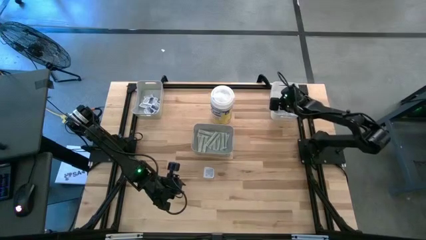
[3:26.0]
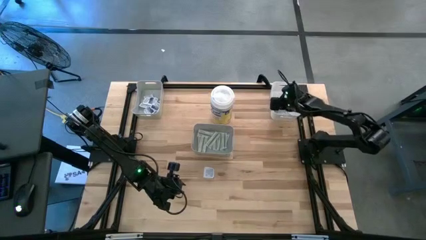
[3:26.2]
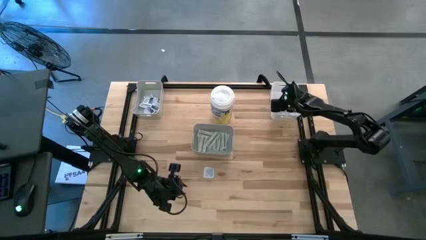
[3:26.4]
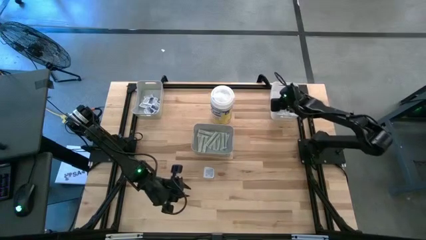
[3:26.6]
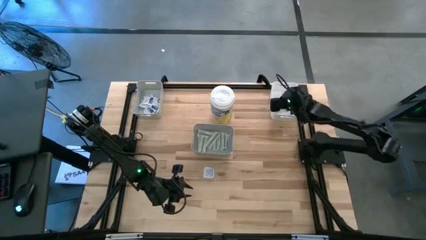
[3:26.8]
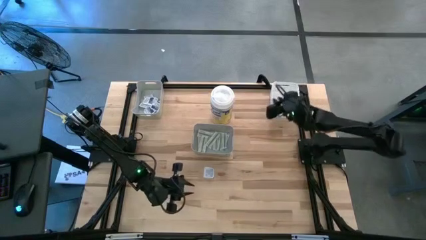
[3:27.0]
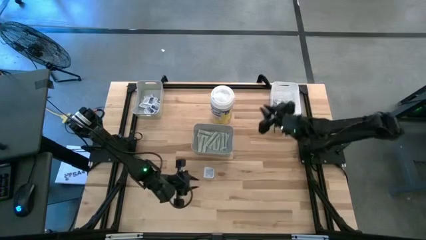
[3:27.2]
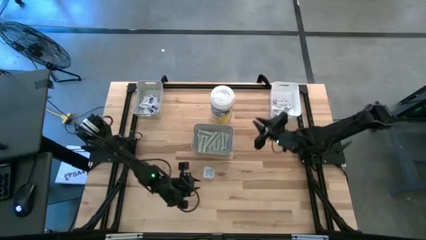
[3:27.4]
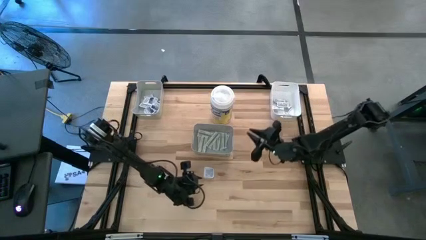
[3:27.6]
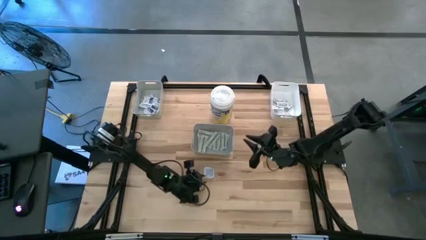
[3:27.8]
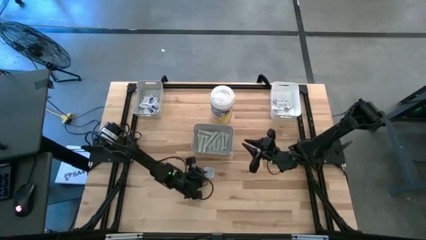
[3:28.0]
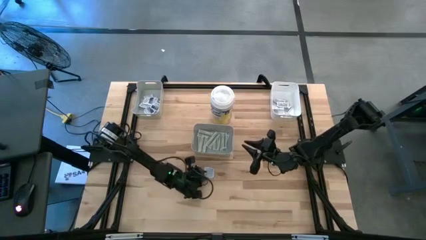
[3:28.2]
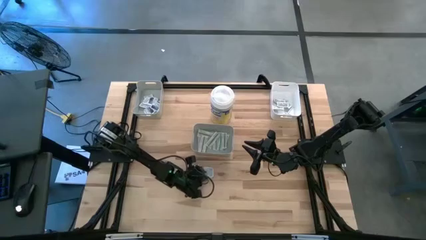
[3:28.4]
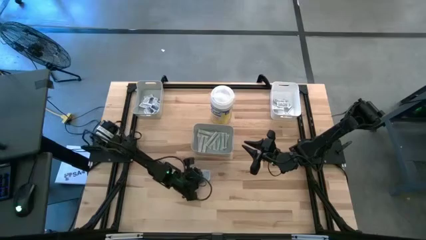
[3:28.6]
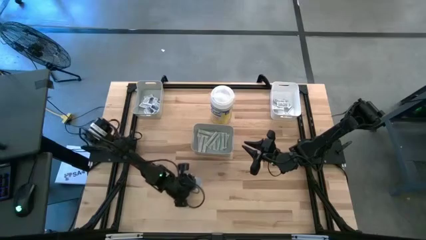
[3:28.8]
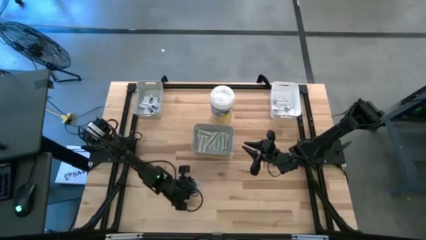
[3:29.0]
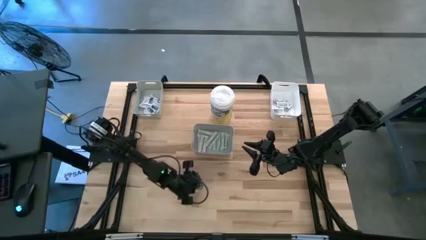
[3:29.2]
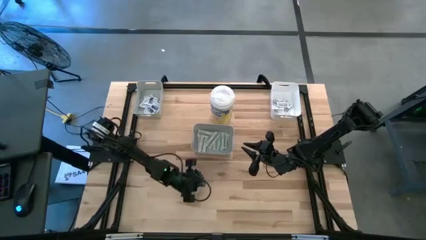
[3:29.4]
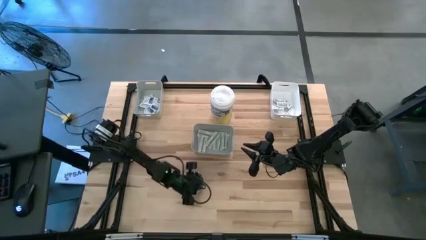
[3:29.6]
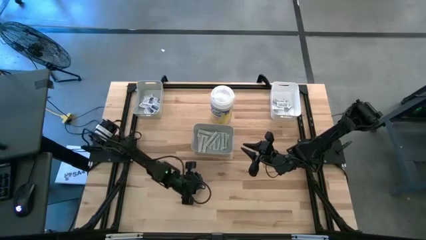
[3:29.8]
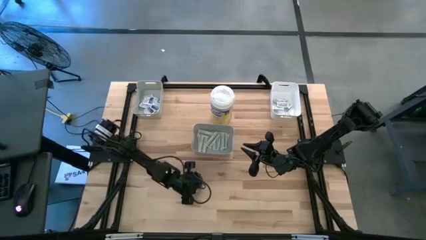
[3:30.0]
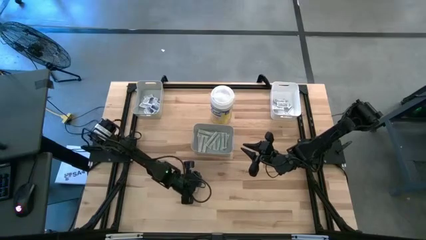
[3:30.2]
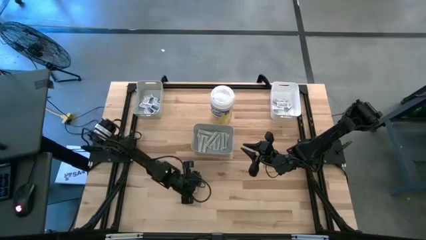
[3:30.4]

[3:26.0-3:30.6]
Task: Pick & Place First Aid Supplies
Put the alcohol pad into the top gray bin

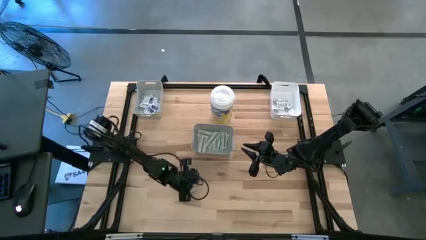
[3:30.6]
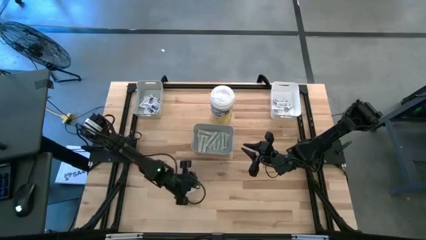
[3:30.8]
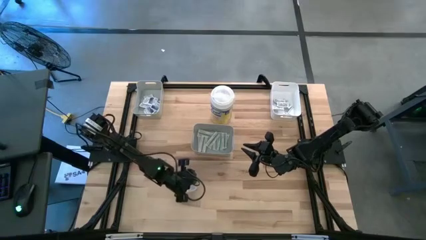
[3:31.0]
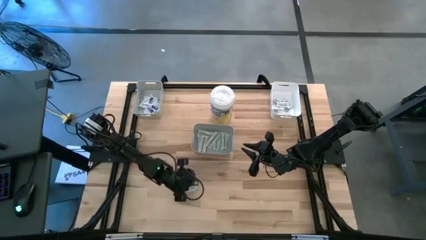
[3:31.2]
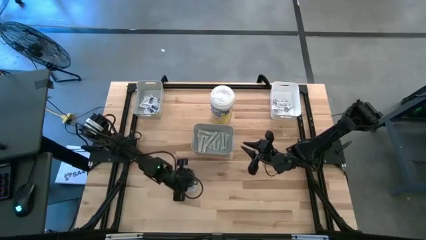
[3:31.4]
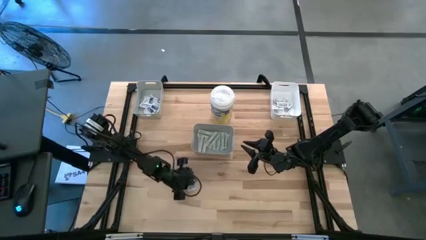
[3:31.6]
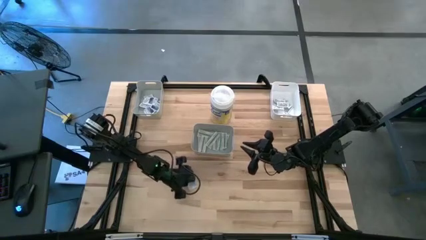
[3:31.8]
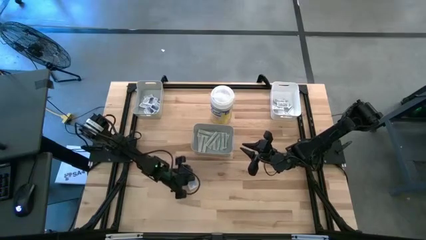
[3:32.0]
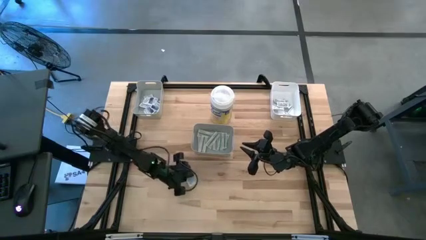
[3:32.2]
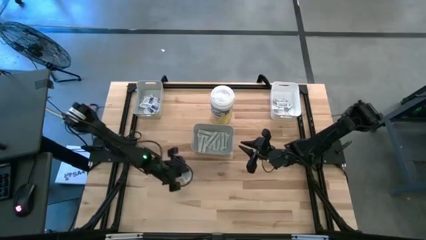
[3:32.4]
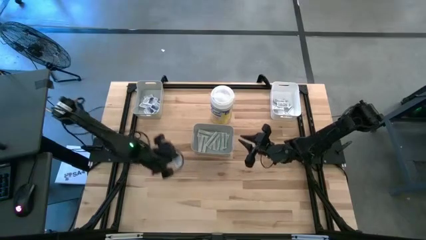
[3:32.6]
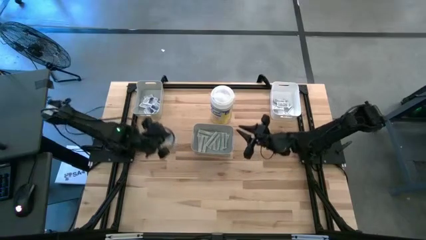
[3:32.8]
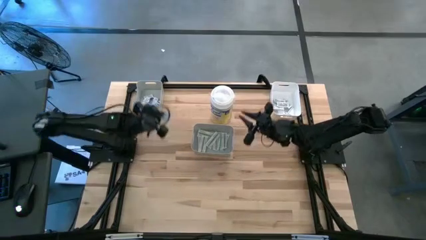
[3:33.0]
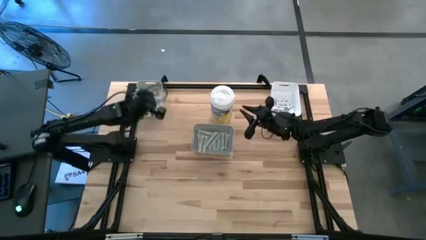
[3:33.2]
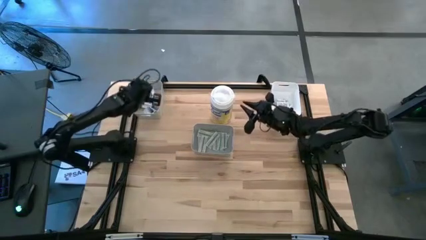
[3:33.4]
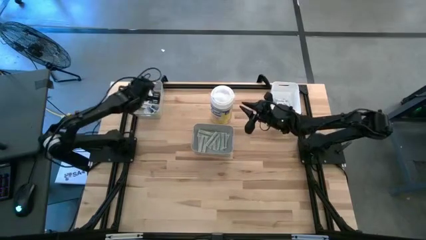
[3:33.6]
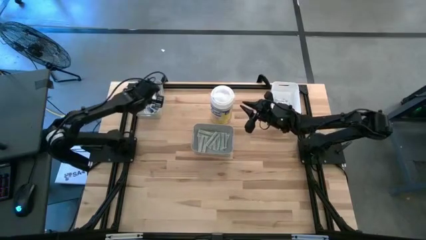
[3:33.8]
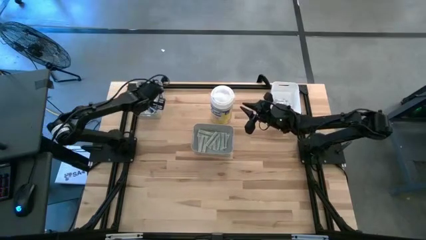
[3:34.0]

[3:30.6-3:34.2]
Put the alcohol pad into the top gray bin

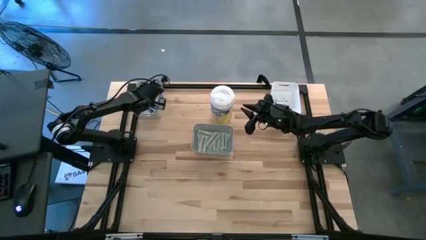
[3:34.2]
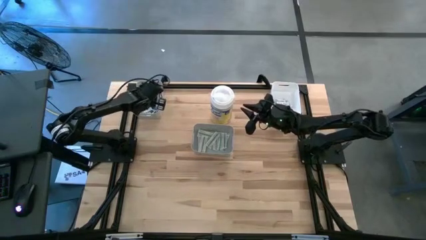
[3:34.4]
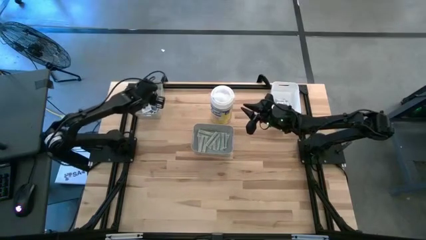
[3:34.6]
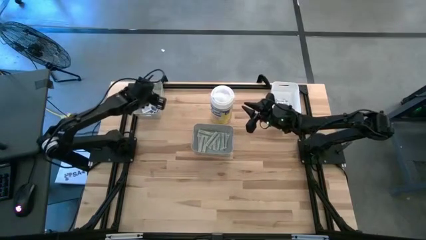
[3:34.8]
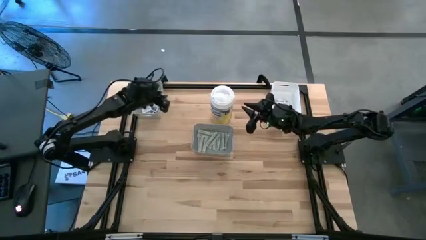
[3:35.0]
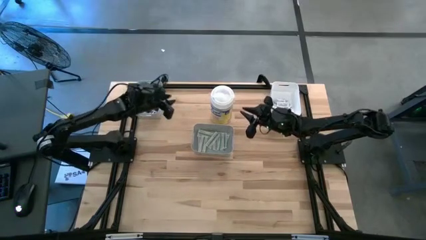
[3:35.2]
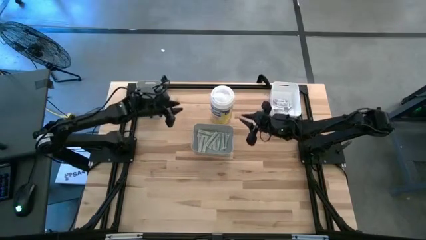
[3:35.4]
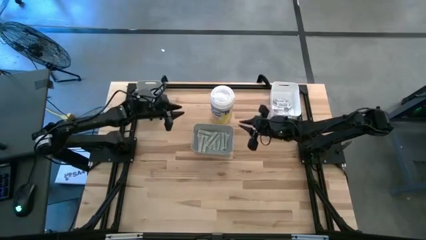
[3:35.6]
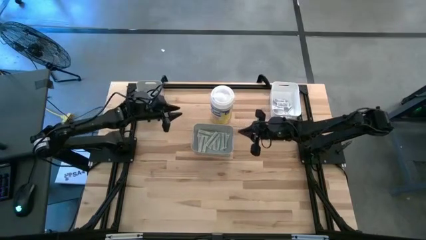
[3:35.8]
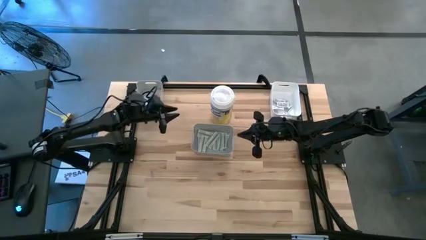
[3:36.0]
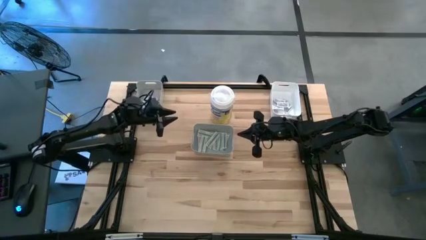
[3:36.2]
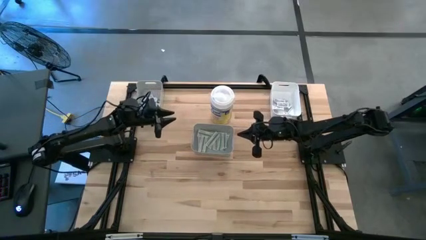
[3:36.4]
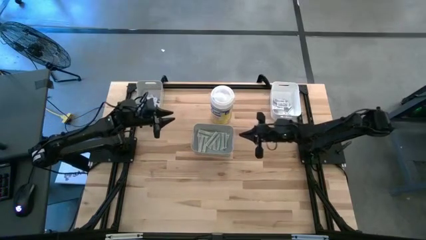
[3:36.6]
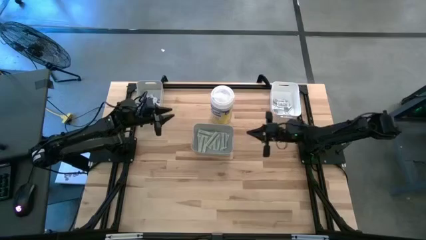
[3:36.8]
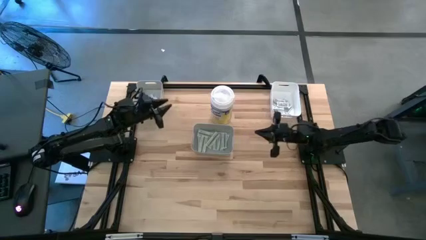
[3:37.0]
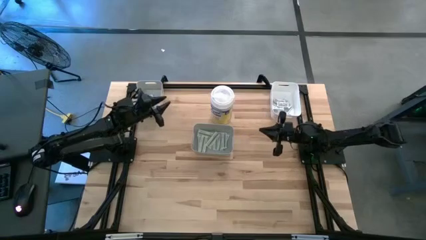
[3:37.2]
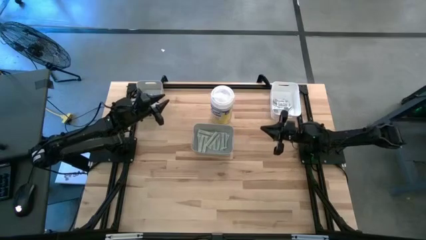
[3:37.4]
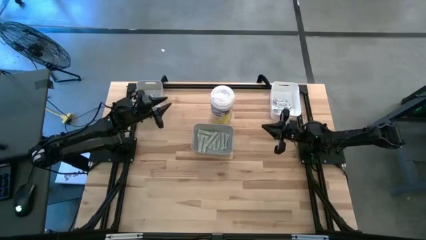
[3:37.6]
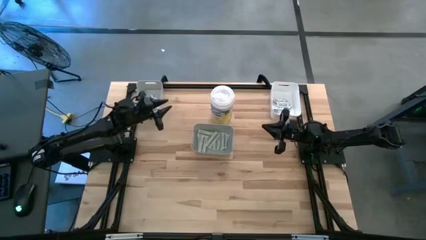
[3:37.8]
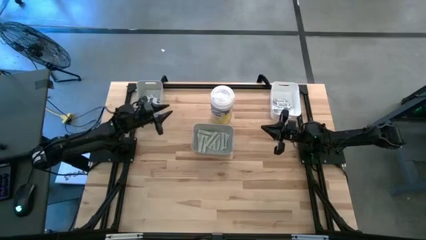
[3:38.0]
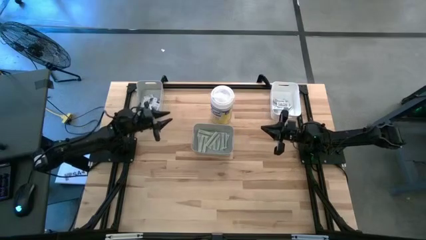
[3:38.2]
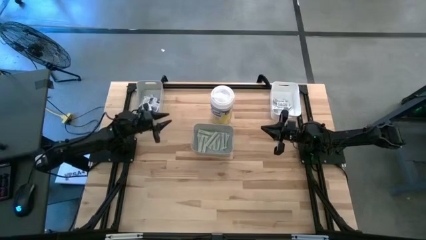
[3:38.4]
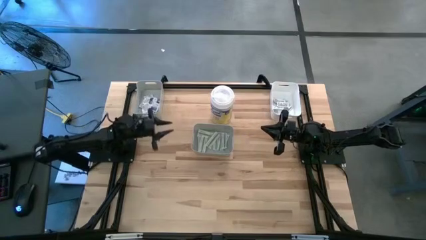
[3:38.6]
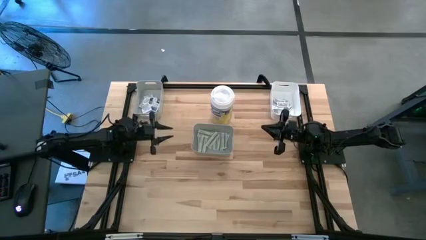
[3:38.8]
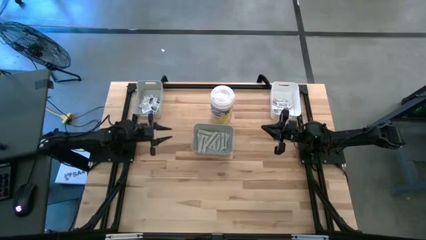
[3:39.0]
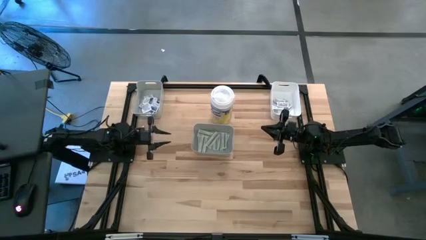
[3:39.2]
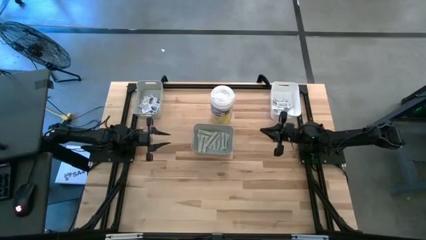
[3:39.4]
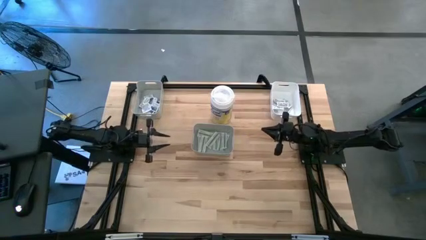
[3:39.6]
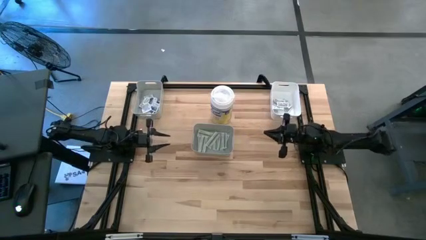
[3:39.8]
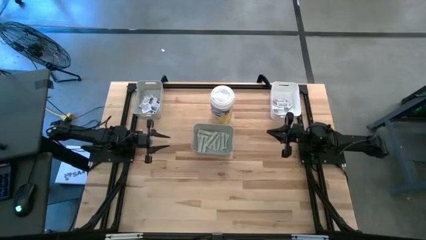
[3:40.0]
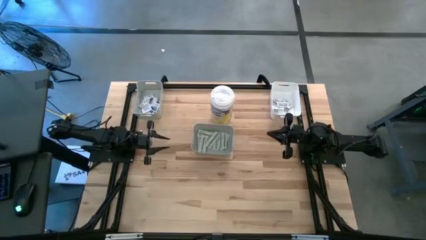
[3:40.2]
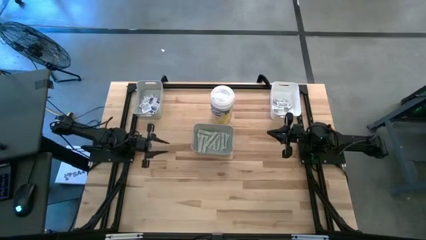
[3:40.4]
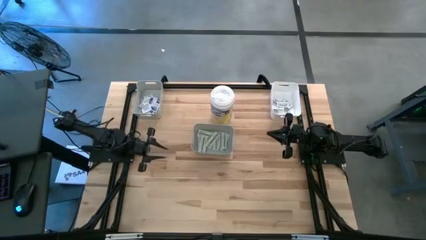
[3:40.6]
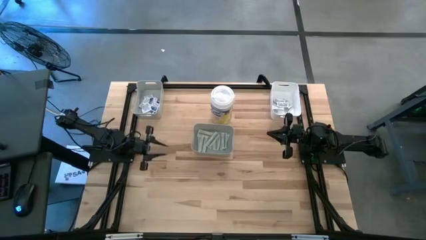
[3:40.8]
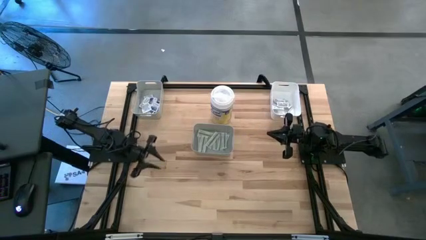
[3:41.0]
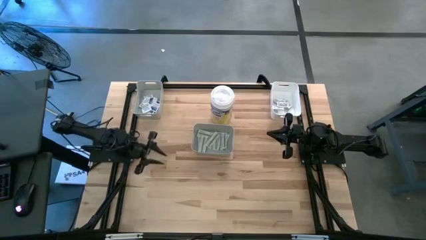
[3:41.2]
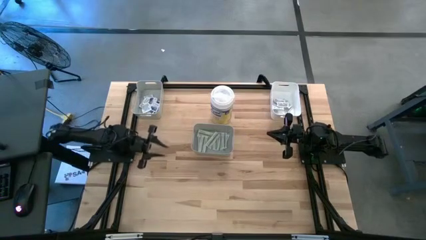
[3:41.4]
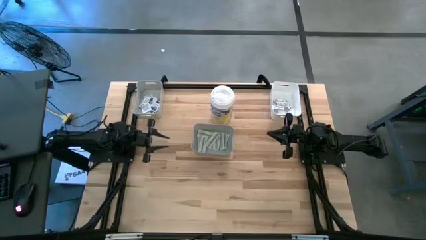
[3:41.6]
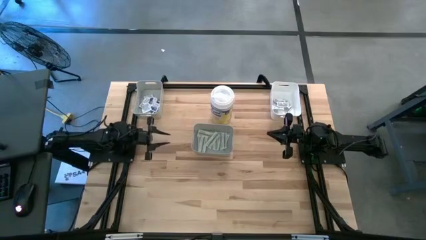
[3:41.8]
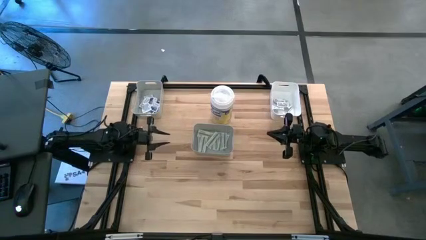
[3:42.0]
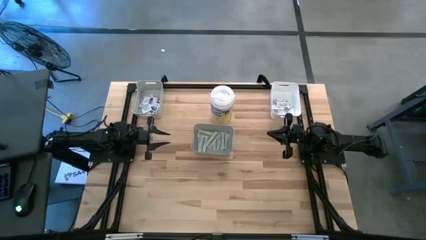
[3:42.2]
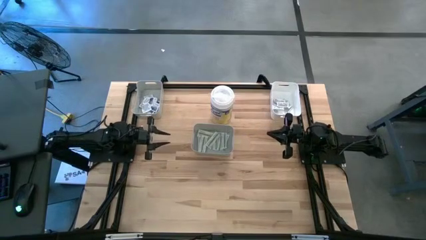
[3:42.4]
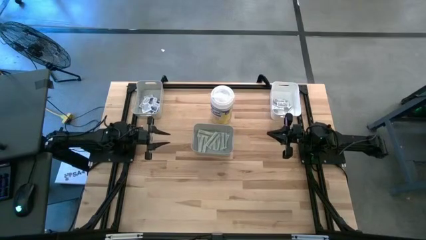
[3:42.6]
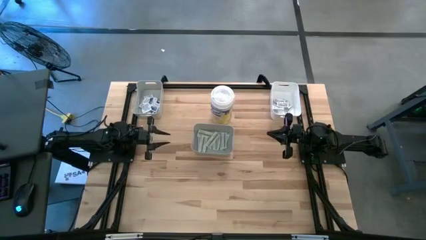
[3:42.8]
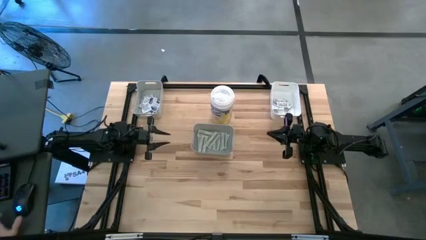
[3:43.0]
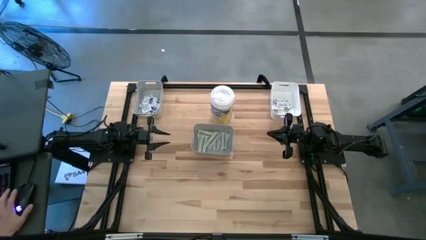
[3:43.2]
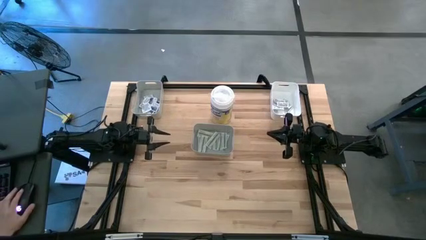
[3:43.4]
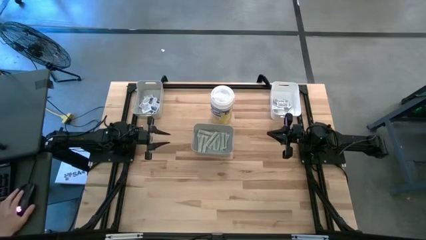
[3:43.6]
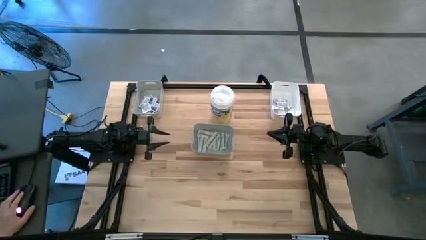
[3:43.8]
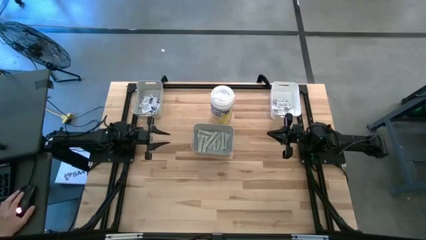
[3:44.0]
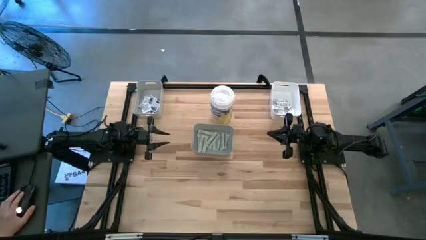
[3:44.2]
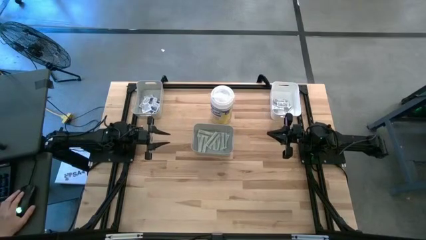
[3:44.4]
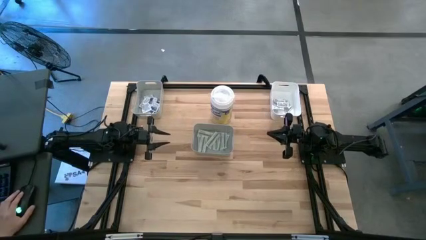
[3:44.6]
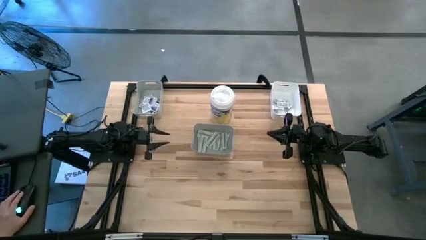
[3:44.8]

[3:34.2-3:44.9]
Return to Home Position
